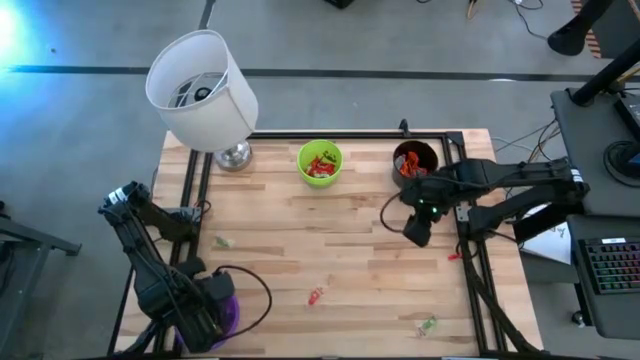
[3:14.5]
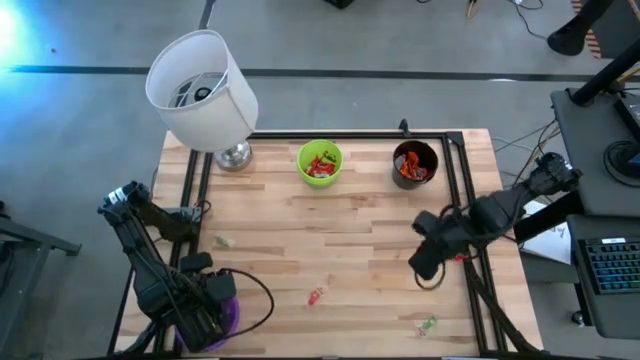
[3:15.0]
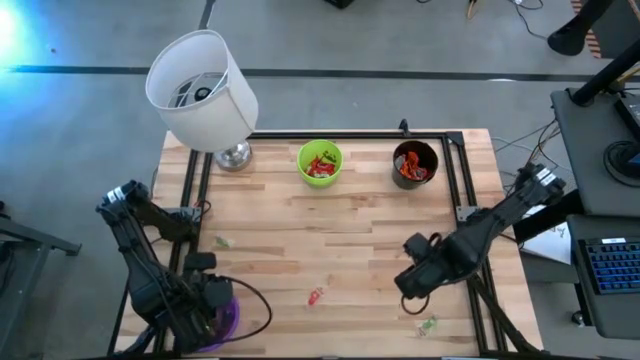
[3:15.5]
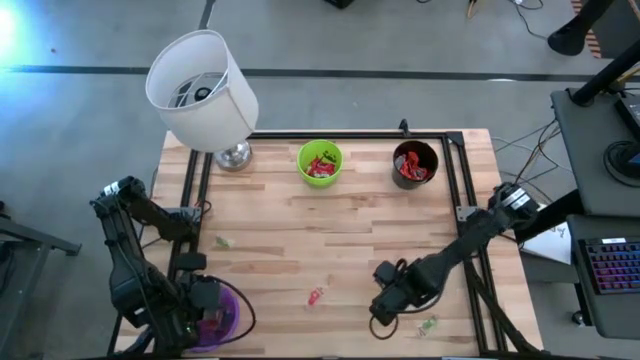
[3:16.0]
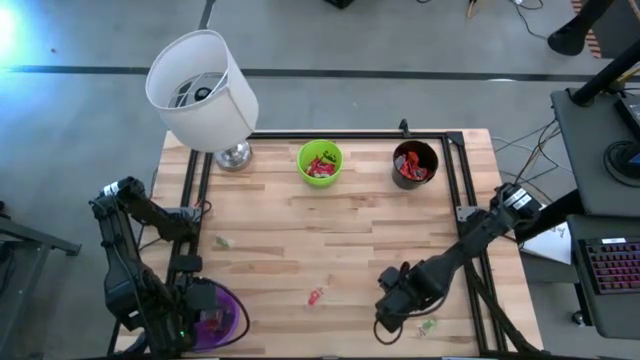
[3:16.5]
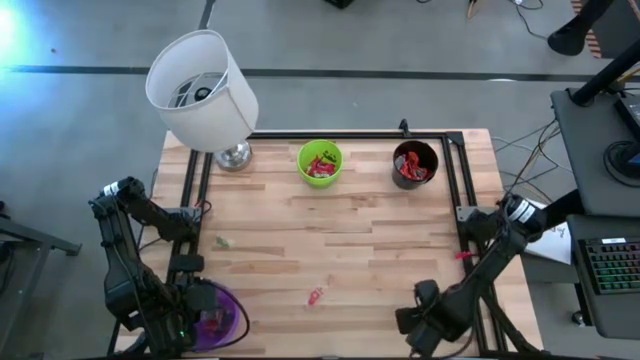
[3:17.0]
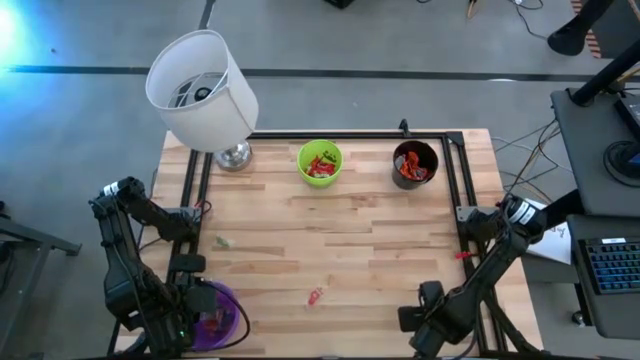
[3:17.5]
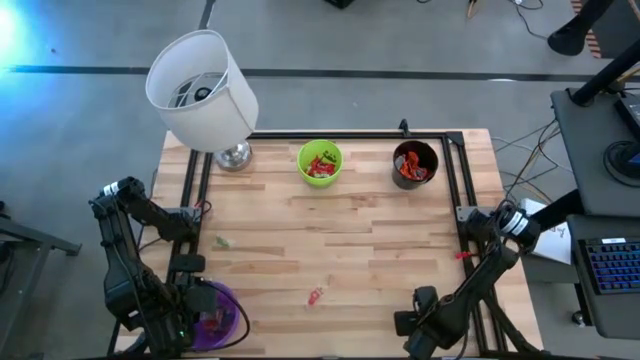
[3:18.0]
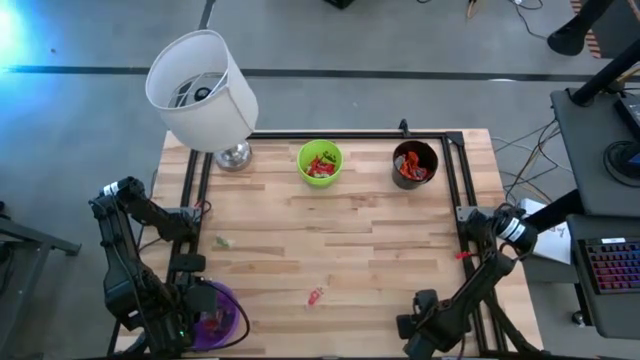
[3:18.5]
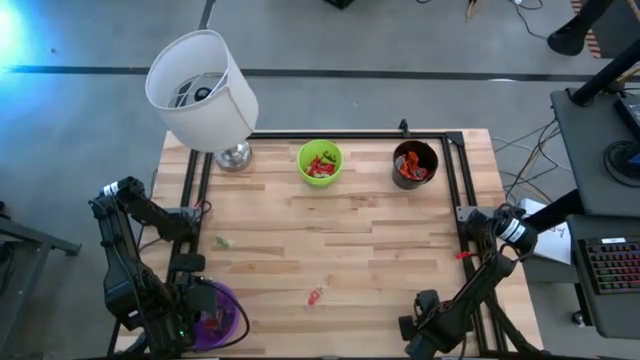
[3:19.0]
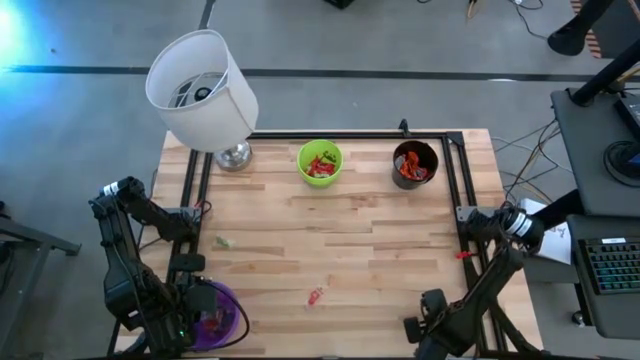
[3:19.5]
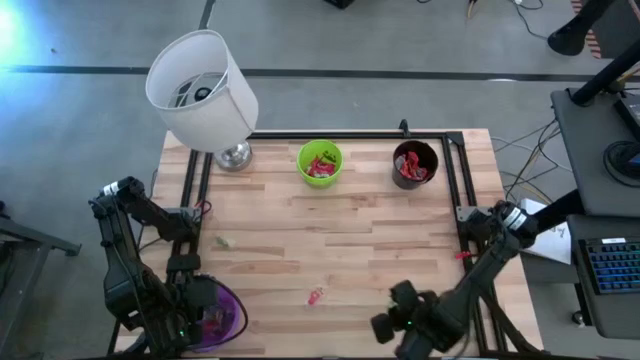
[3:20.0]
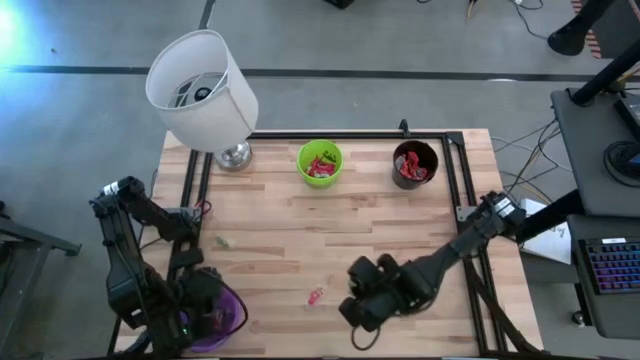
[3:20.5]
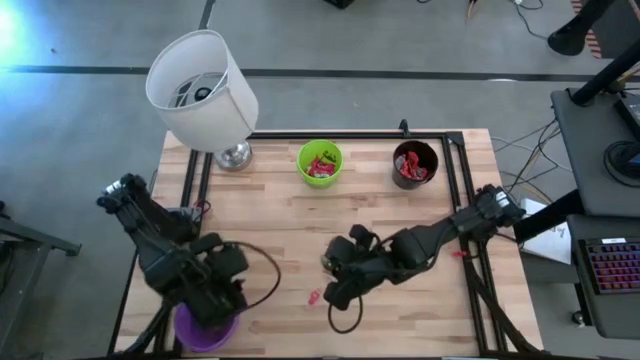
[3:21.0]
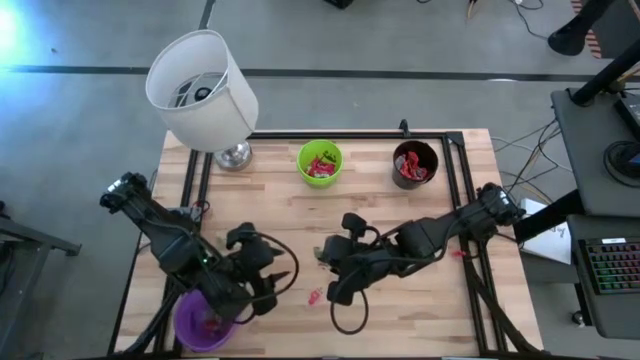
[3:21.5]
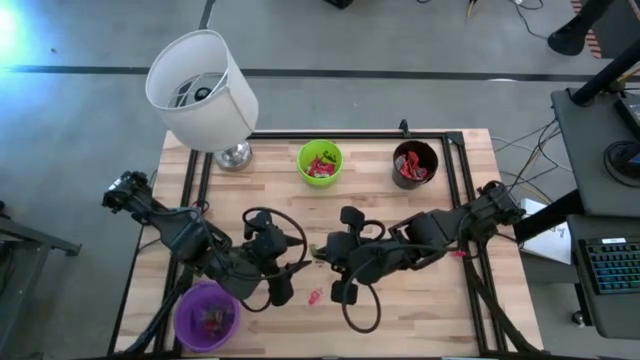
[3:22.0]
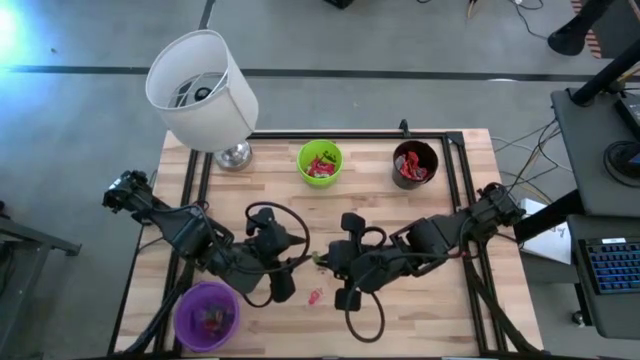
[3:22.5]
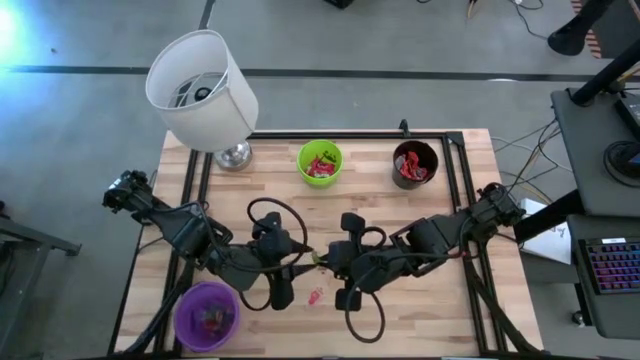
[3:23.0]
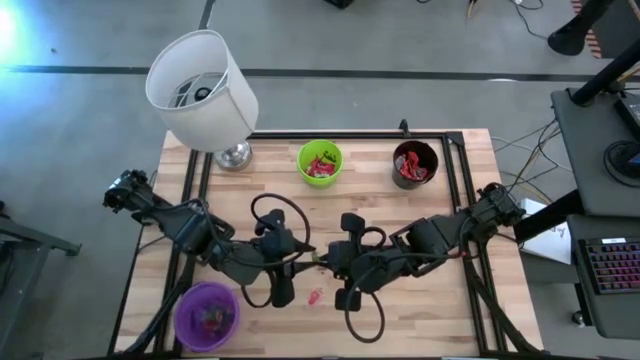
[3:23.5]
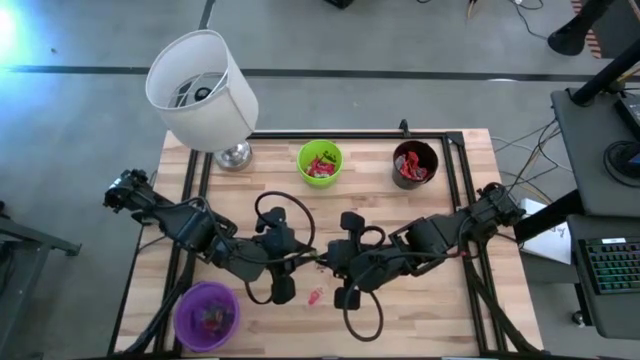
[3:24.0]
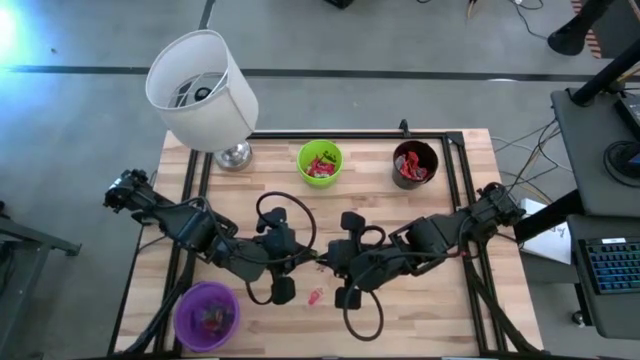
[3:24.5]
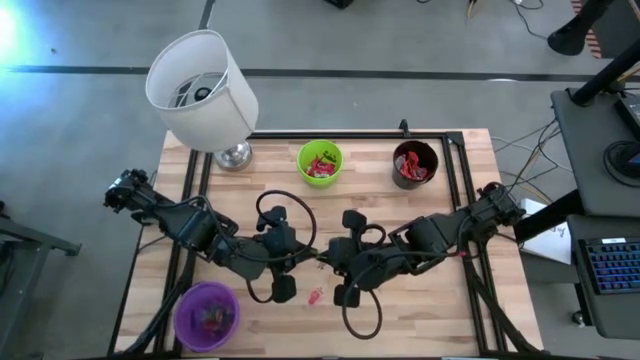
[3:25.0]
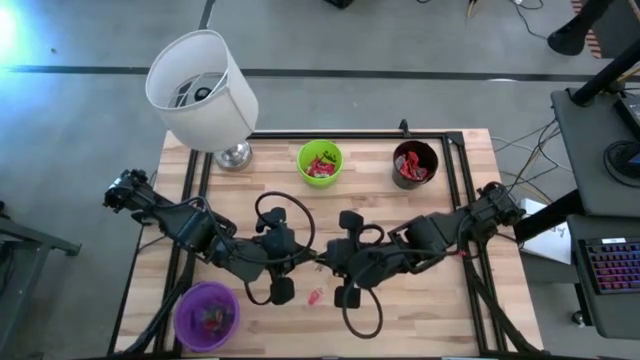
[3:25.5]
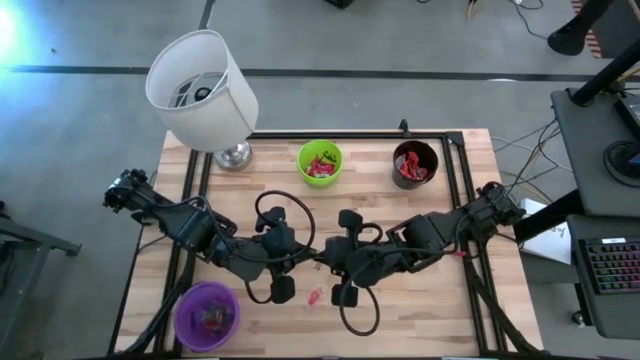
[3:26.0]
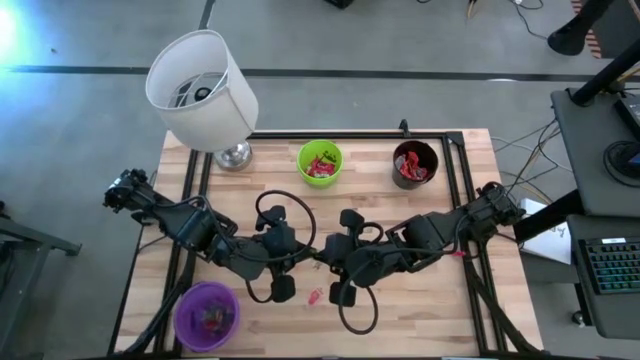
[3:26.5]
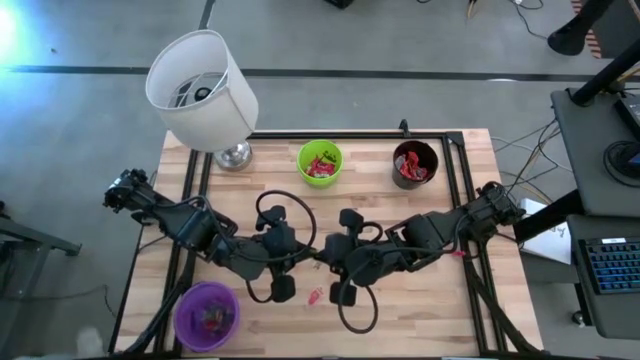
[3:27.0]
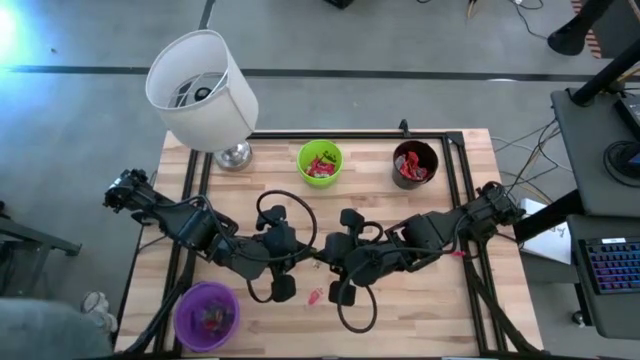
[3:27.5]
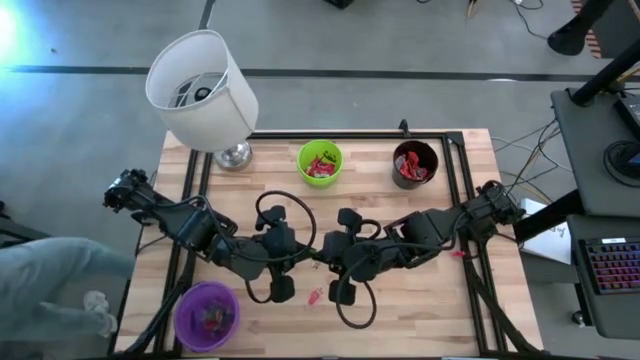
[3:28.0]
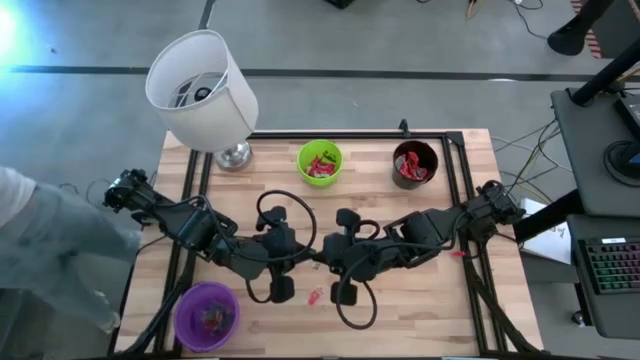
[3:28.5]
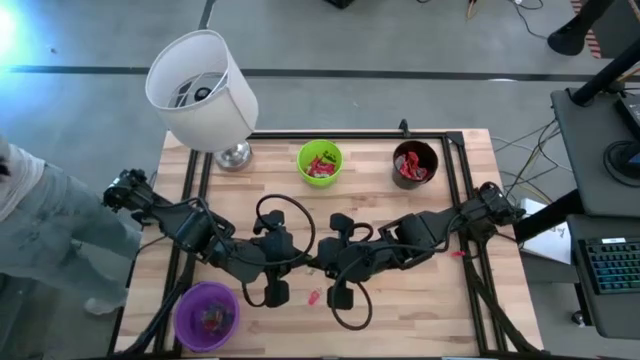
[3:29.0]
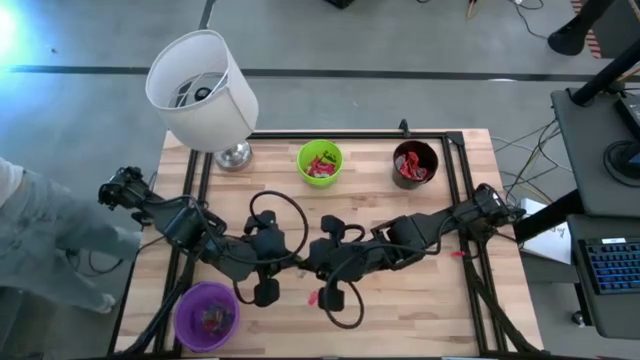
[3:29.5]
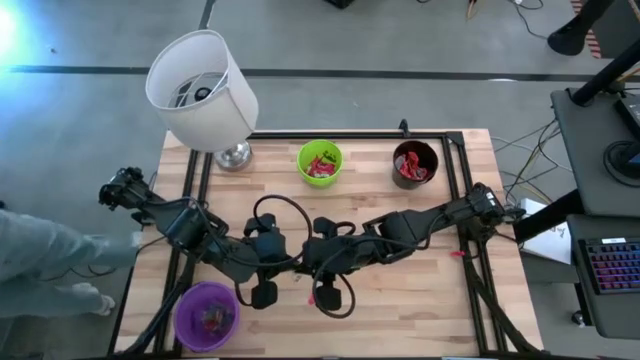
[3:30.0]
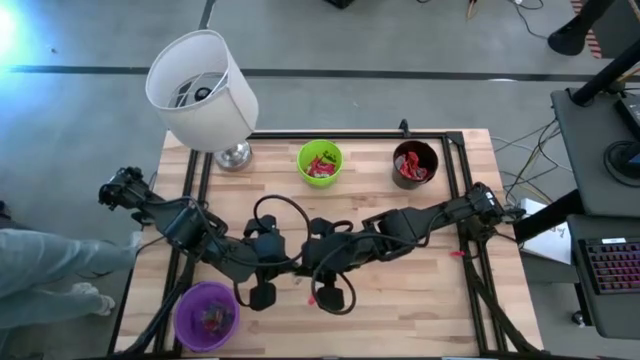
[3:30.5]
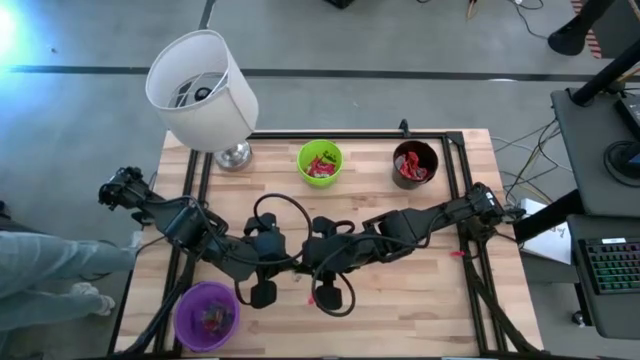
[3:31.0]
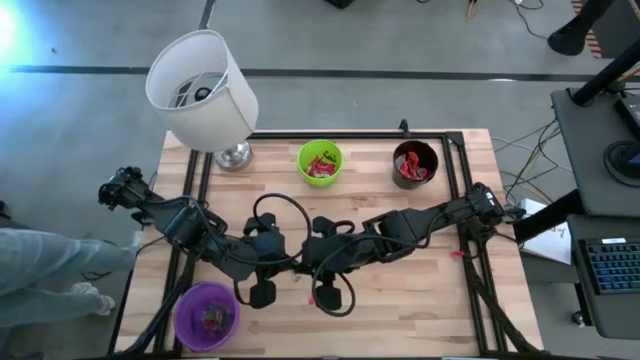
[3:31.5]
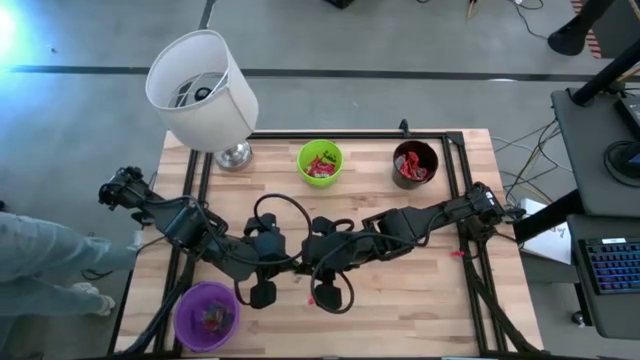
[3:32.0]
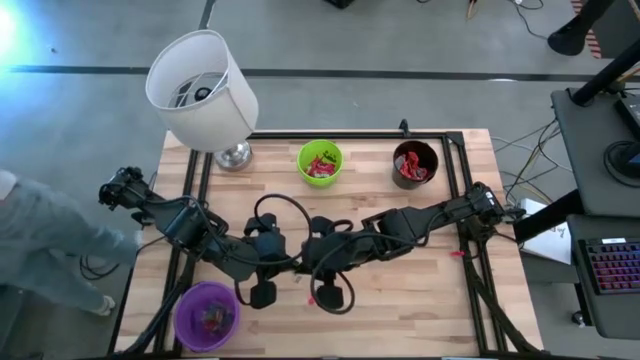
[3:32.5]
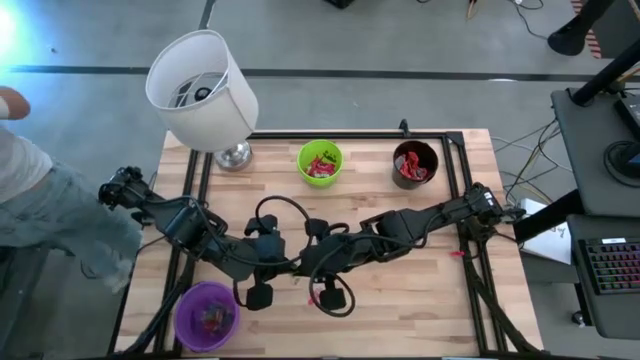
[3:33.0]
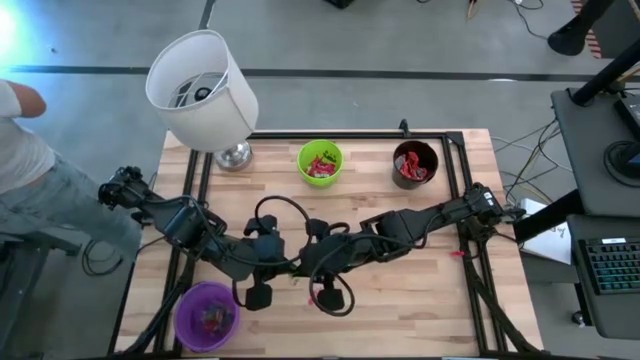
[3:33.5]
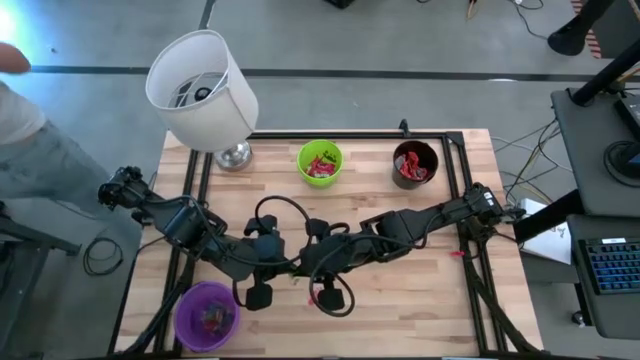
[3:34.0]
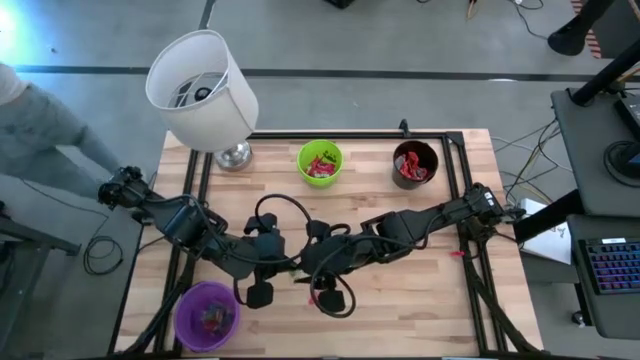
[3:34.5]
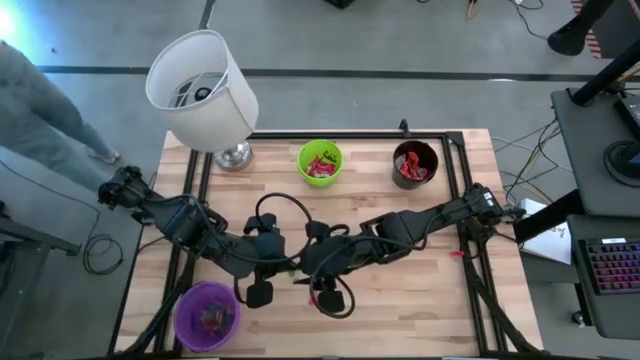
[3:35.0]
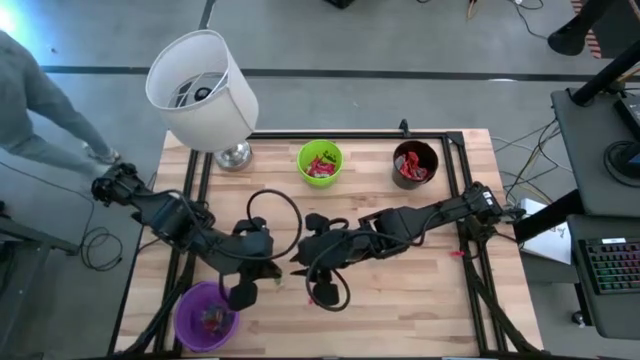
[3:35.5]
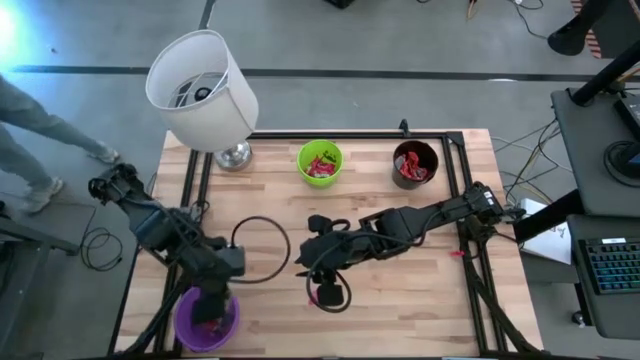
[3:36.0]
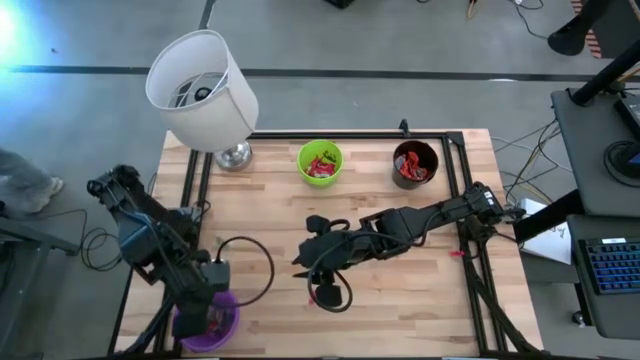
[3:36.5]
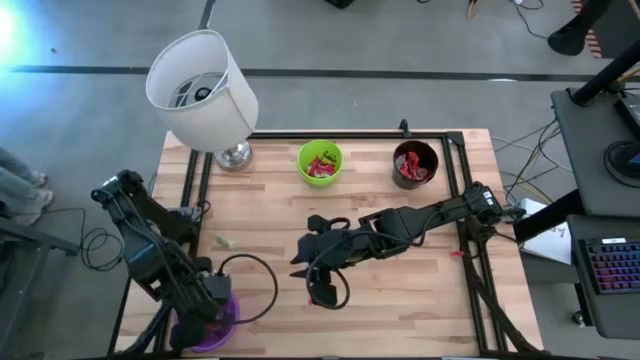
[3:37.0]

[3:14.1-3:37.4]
Task: Sort candy
Put the bottom right green gummy candy into the violet bucket
